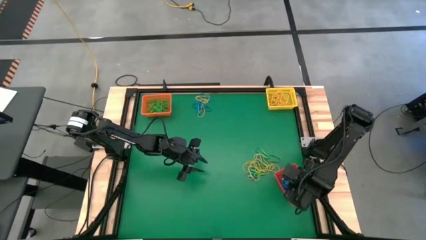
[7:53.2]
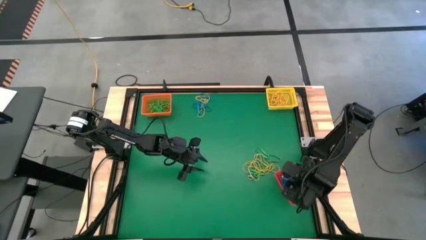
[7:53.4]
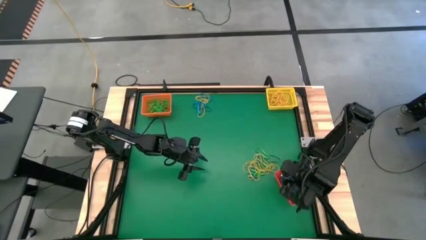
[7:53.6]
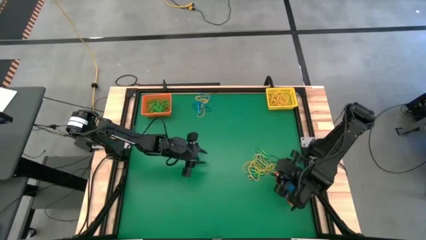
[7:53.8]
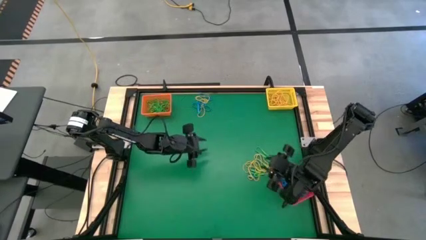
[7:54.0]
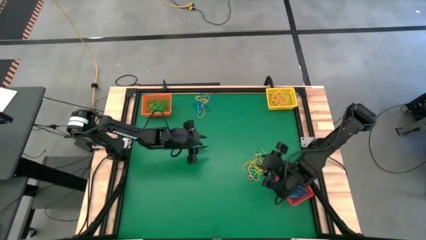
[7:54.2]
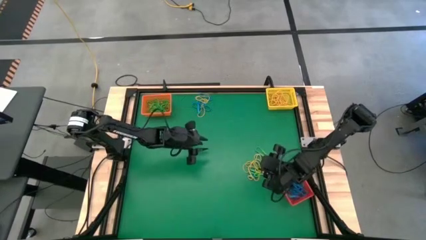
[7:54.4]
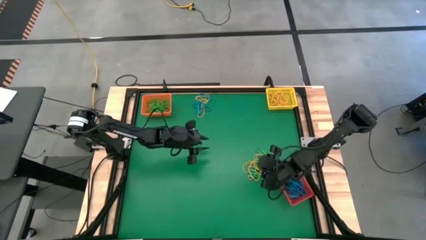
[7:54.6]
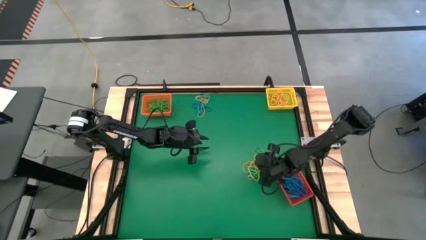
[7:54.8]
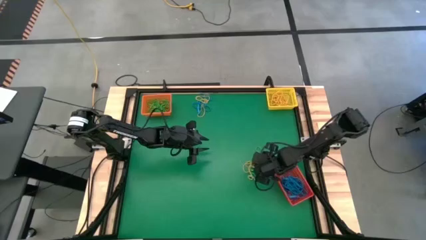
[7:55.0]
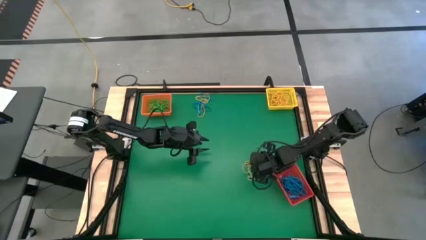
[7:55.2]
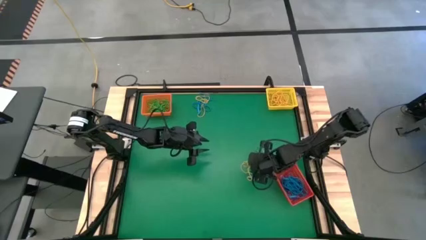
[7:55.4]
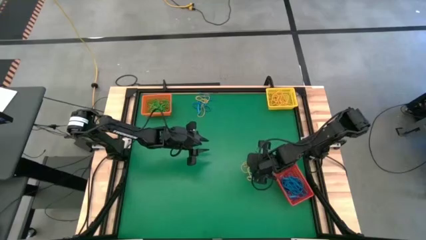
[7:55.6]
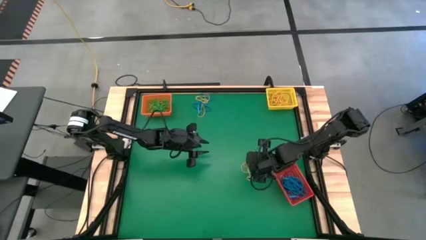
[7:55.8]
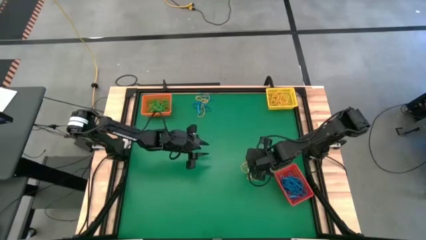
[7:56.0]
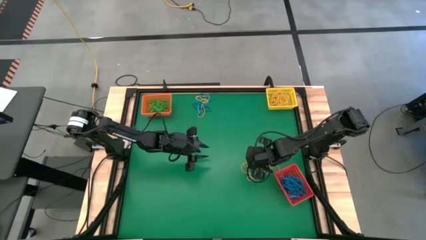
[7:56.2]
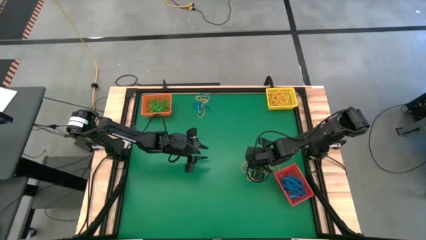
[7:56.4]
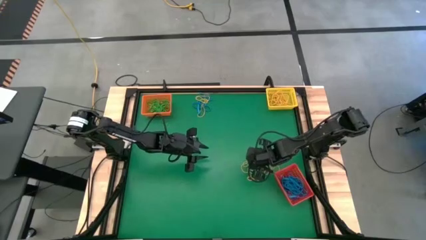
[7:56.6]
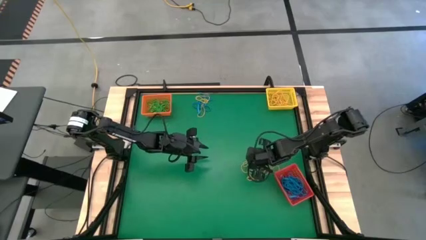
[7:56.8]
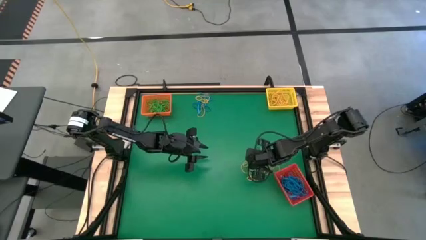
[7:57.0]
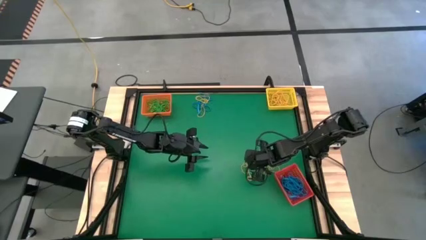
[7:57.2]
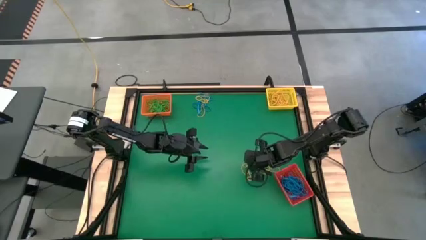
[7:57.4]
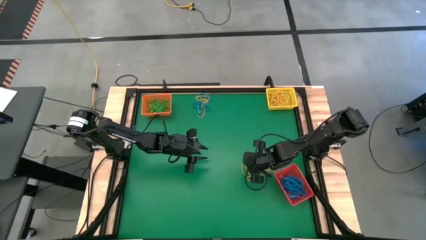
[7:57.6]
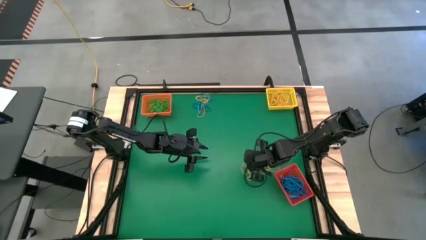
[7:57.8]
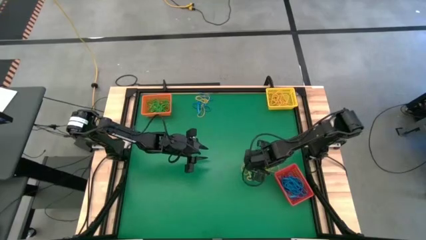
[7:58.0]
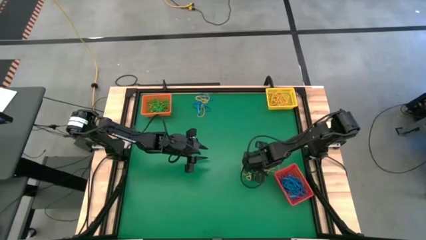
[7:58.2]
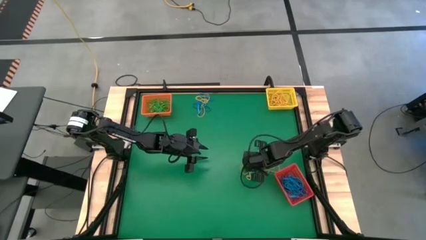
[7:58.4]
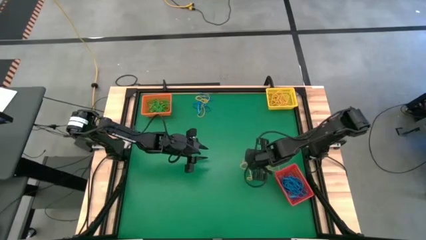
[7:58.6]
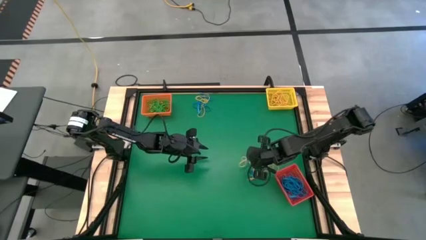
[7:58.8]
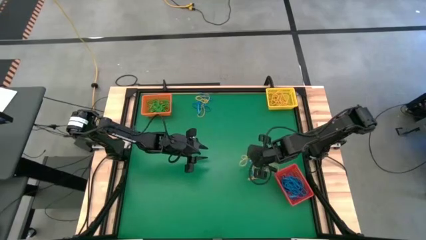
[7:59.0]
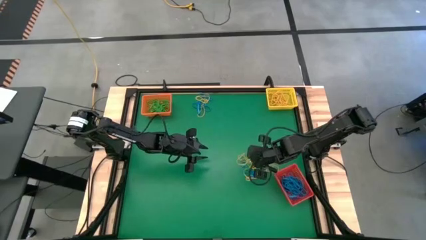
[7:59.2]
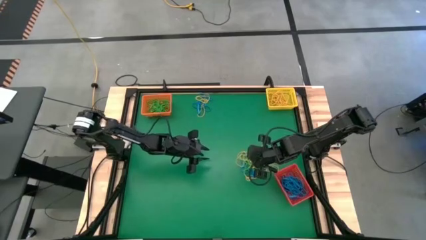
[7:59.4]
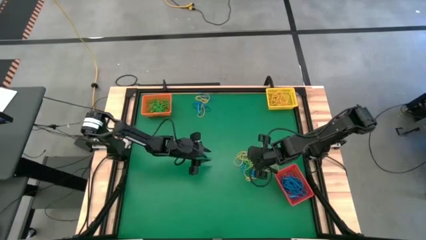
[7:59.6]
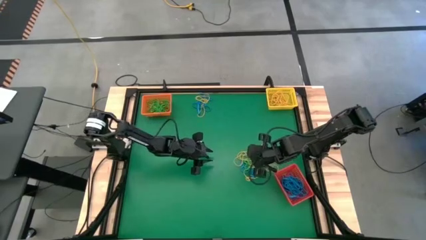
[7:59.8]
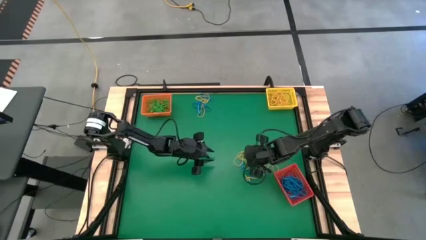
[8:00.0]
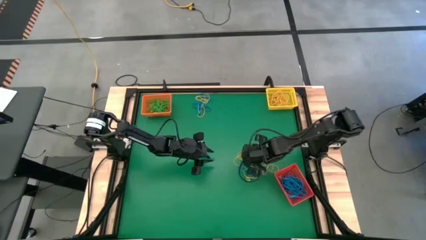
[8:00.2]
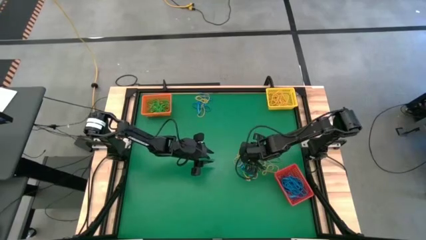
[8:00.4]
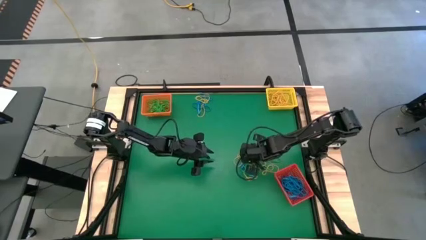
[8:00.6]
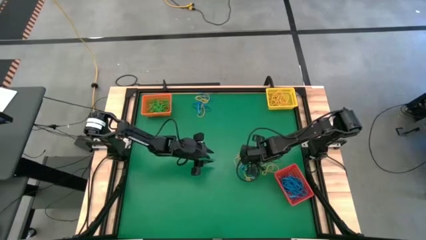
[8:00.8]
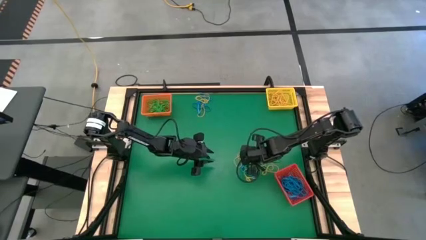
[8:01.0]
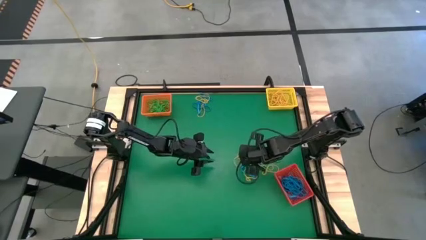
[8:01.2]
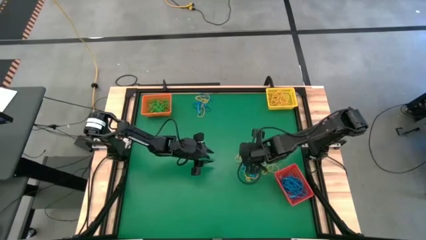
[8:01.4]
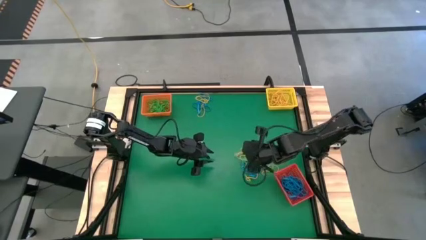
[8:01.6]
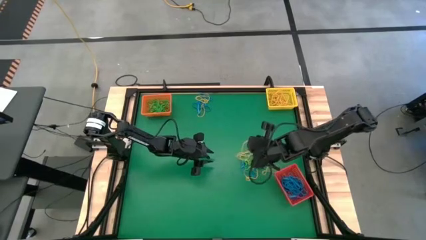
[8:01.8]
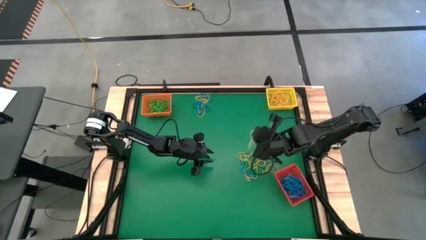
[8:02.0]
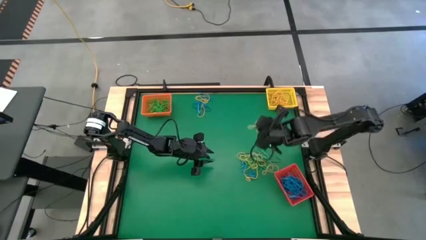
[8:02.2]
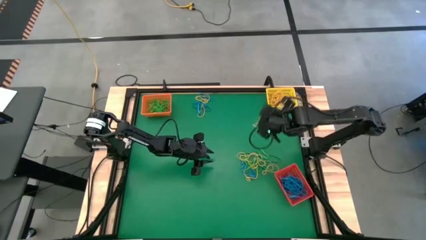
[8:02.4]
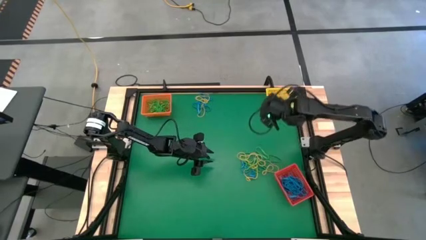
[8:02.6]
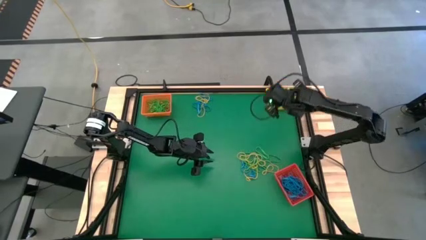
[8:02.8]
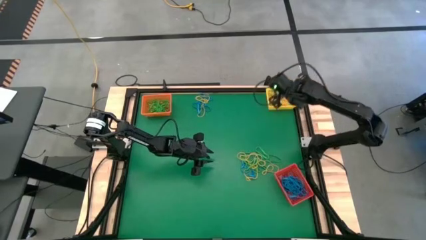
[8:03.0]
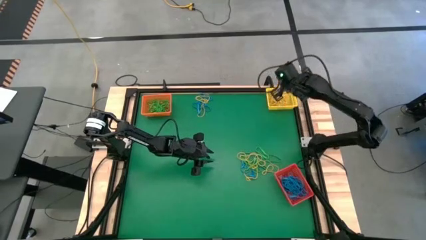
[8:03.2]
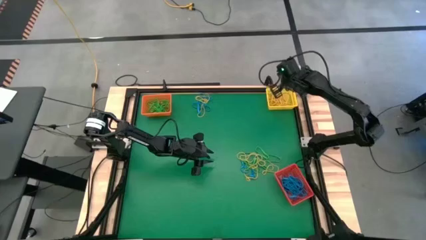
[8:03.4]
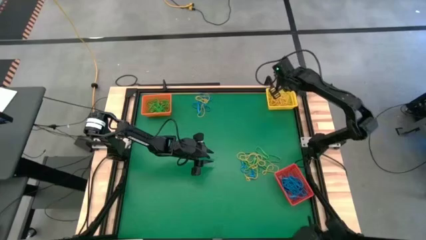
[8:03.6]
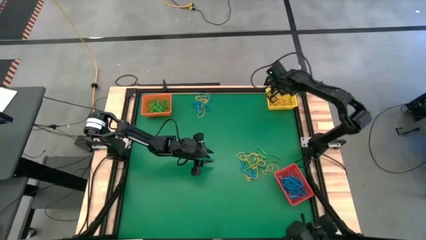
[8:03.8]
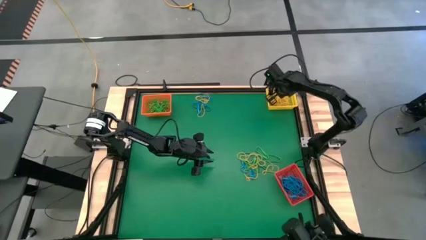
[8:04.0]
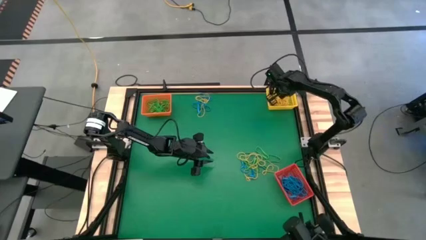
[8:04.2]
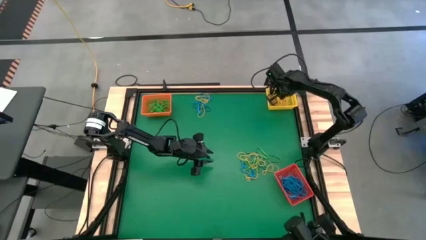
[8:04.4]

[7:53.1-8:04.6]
Task: Sort rubber bands into baskets
Put the yellow rubber band into the yellow bin

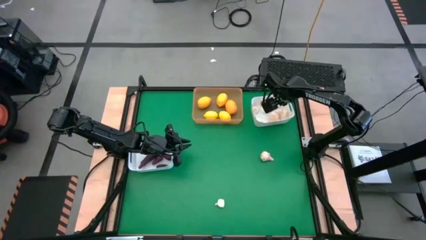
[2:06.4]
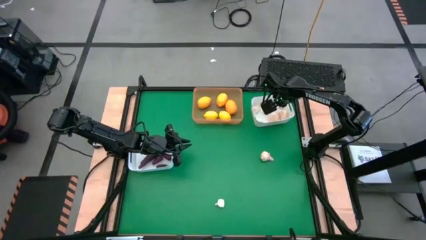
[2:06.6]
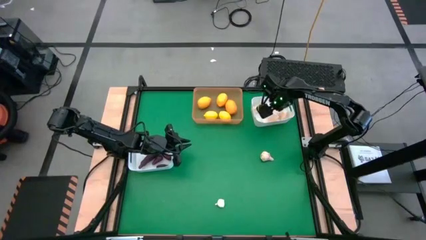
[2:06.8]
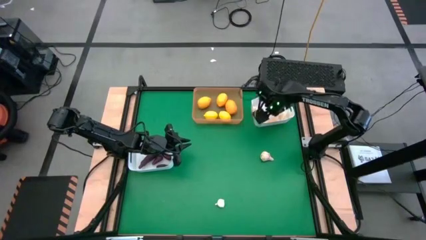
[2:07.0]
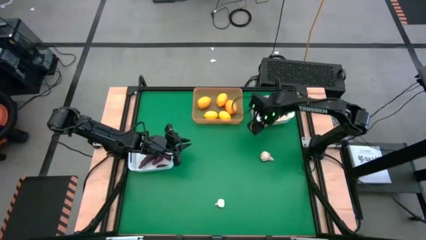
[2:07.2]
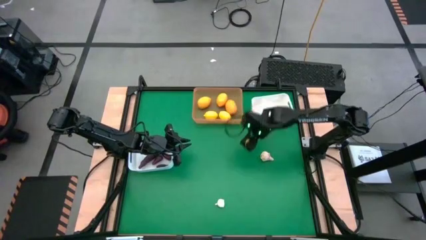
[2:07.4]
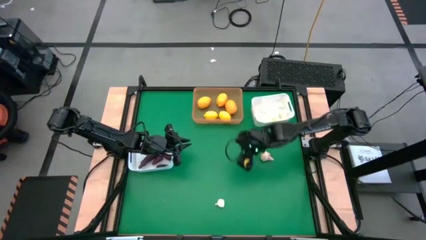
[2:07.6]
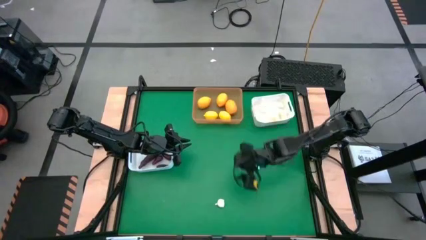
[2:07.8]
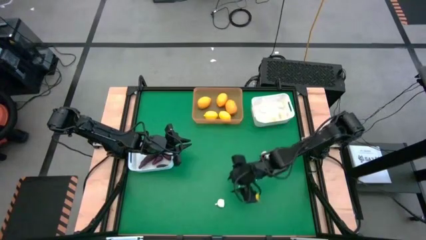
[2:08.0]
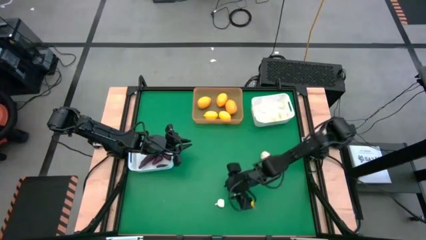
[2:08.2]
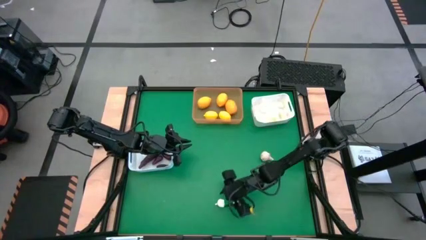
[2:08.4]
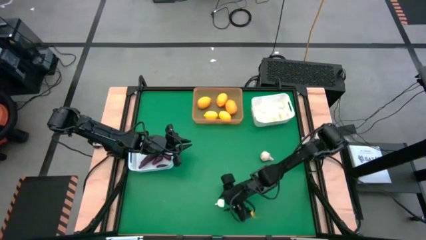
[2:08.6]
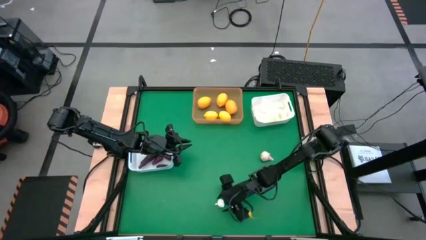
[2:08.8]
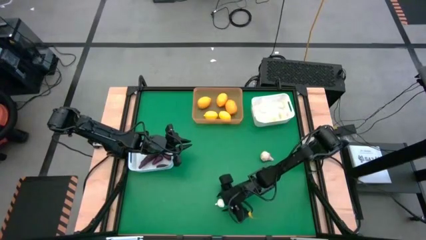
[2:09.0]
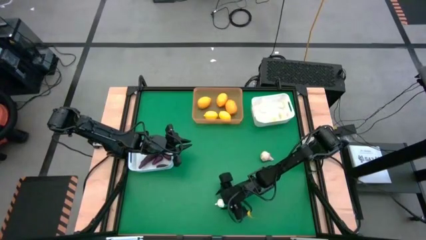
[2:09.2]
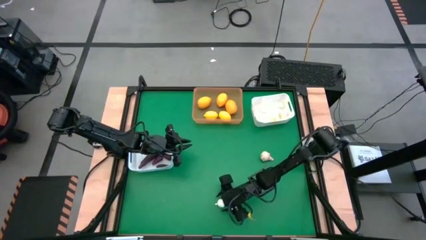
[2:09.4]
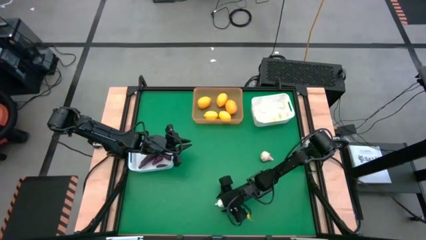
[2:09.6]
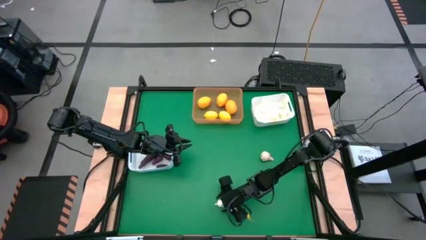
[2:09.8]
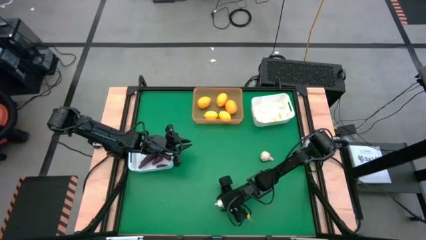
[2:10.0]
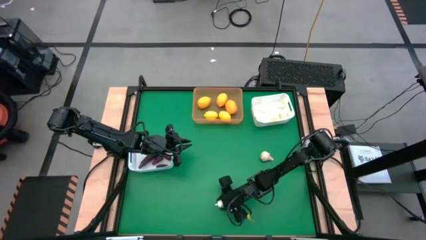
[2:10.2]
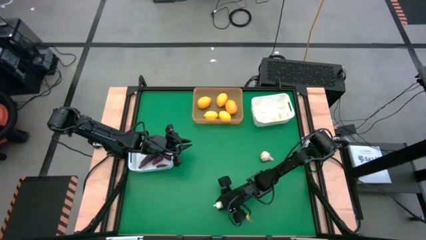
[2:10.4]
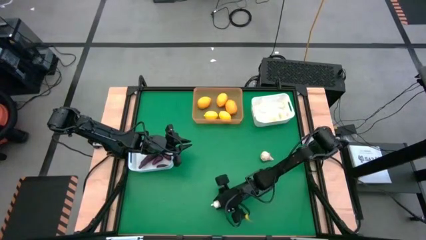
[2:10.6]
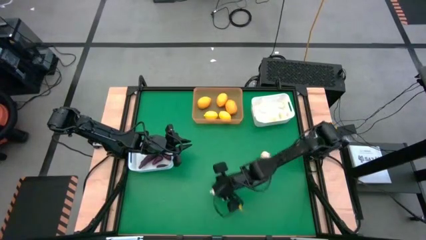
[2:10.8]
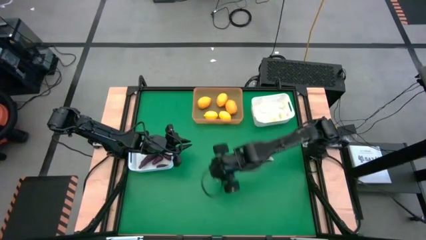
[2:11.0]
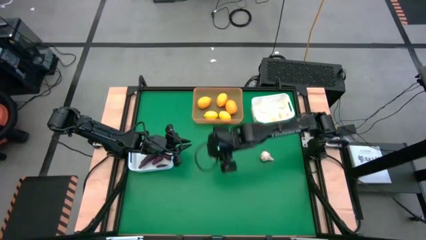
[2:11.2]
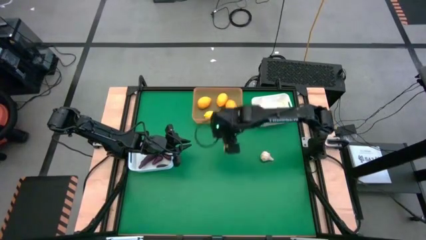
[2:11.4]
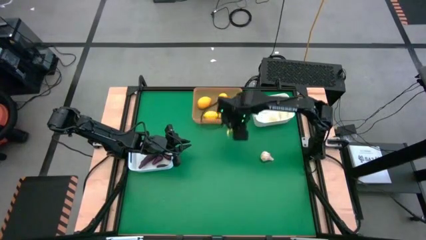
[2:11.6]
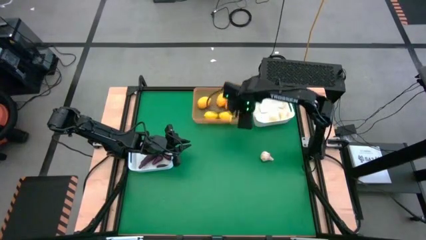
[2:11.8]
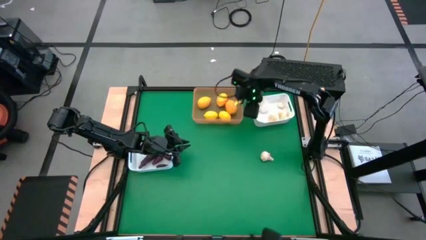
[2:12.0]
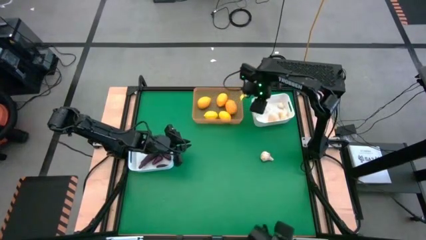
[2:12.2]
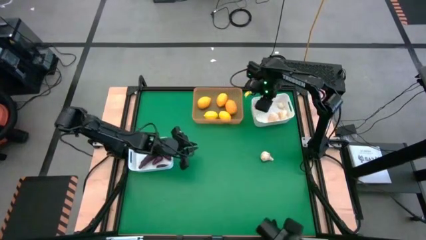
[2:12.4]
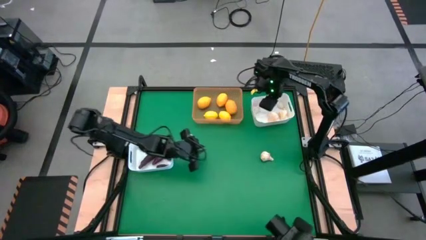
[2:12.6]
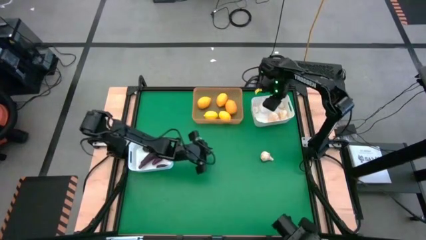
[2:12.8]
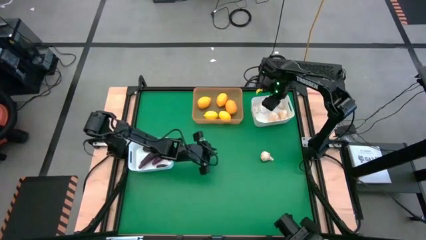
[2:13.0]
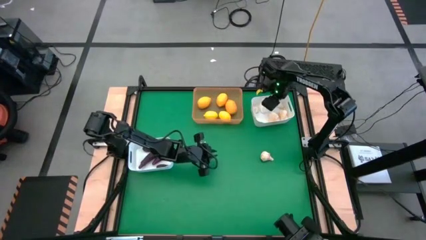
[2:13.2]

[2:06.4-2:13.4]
Task: Sort produce into baskets
Put the garlic into the right white bin
